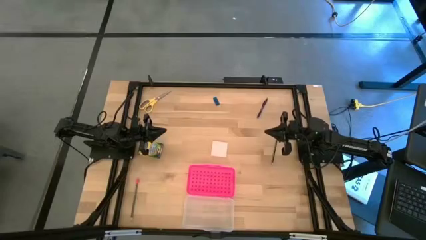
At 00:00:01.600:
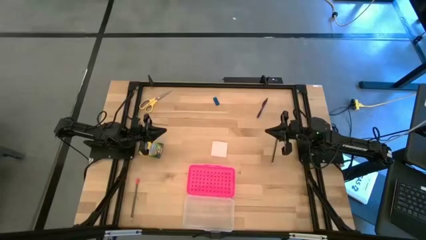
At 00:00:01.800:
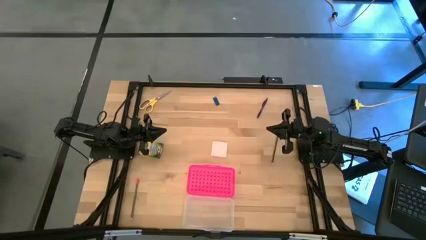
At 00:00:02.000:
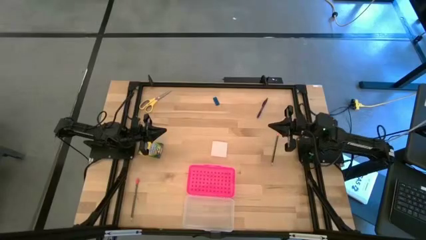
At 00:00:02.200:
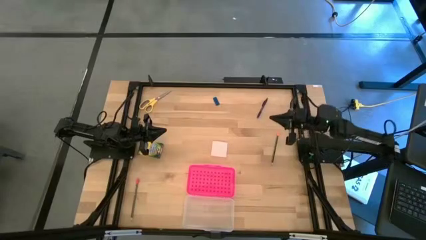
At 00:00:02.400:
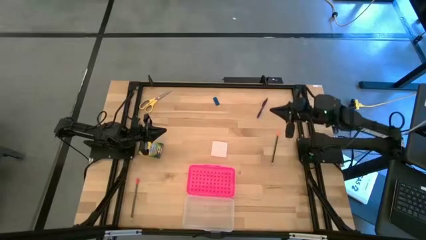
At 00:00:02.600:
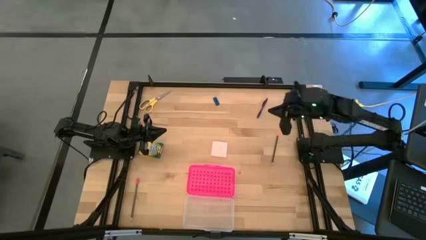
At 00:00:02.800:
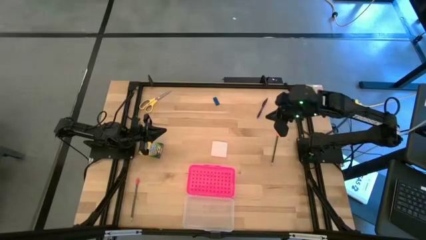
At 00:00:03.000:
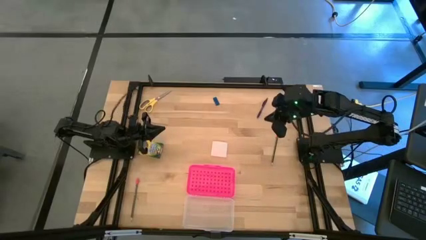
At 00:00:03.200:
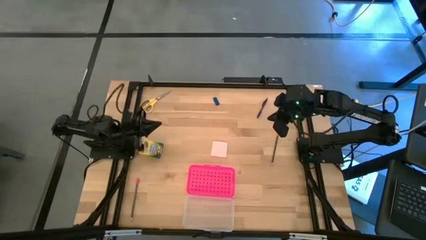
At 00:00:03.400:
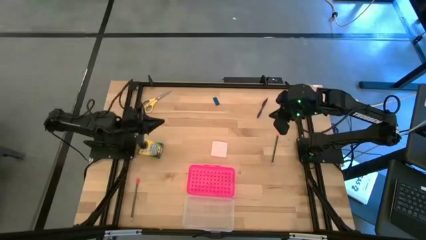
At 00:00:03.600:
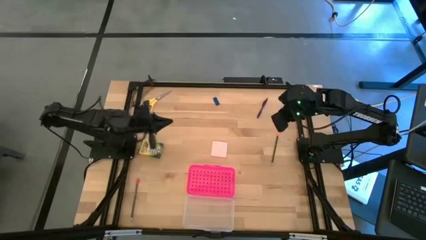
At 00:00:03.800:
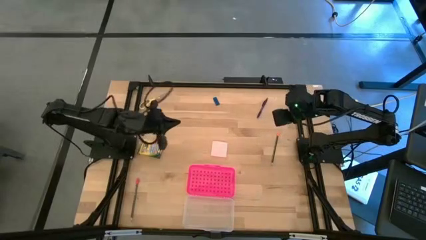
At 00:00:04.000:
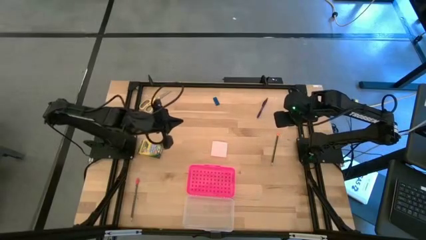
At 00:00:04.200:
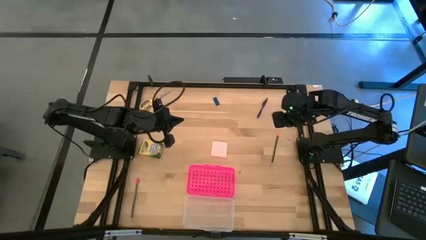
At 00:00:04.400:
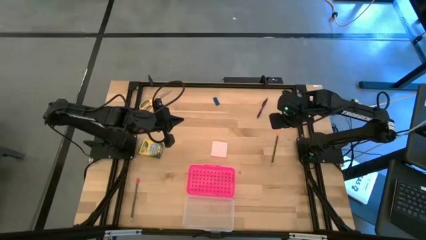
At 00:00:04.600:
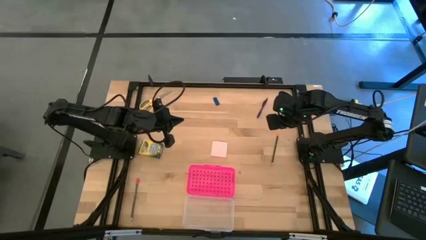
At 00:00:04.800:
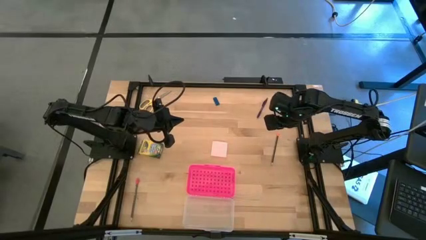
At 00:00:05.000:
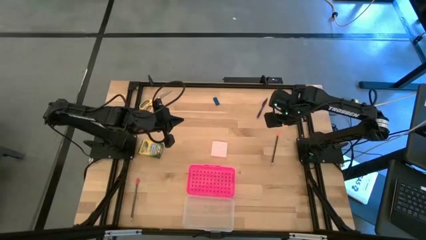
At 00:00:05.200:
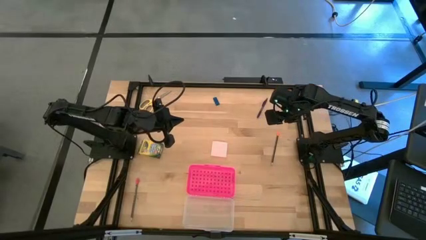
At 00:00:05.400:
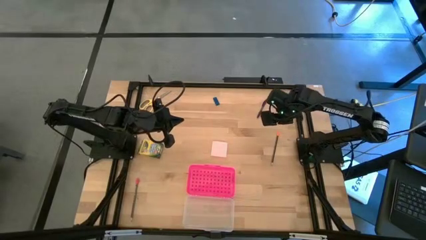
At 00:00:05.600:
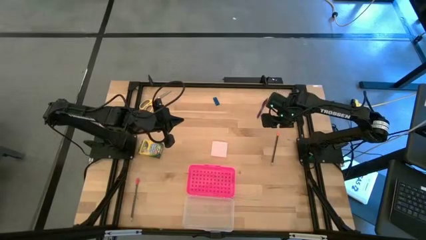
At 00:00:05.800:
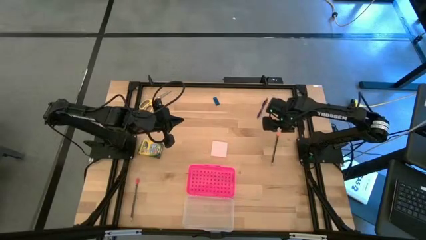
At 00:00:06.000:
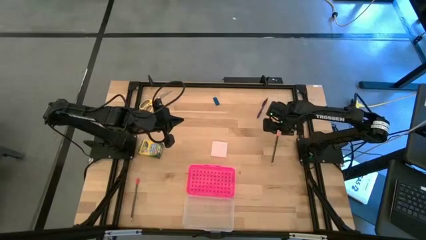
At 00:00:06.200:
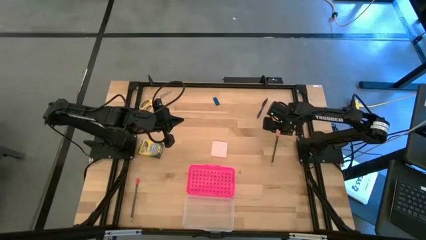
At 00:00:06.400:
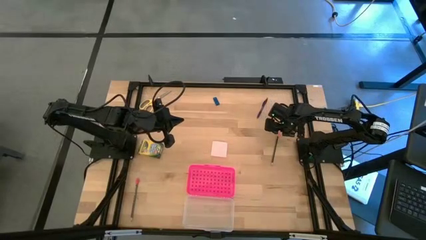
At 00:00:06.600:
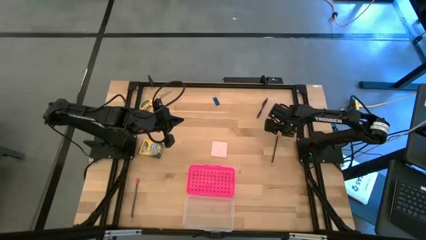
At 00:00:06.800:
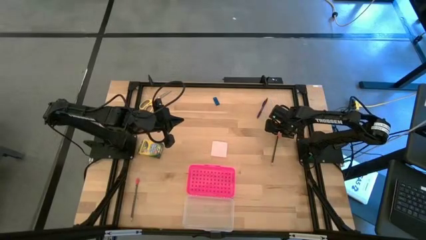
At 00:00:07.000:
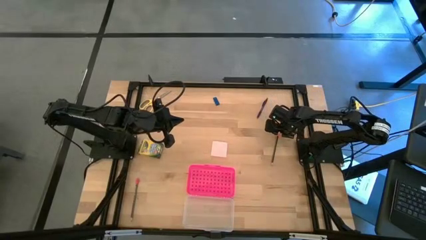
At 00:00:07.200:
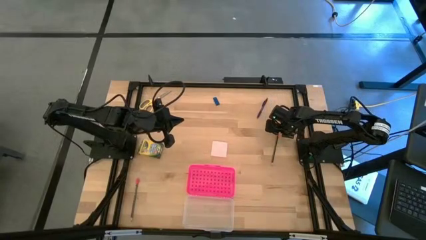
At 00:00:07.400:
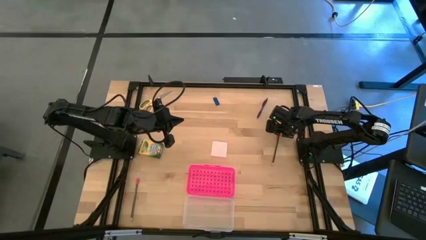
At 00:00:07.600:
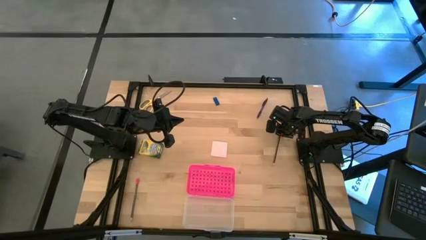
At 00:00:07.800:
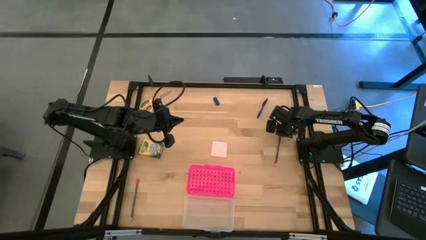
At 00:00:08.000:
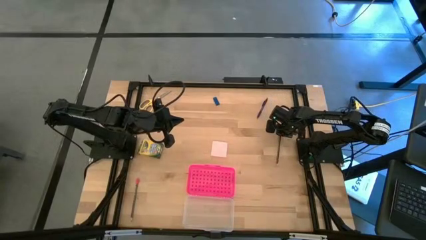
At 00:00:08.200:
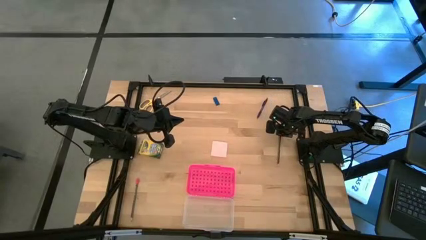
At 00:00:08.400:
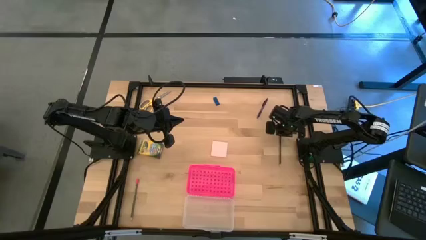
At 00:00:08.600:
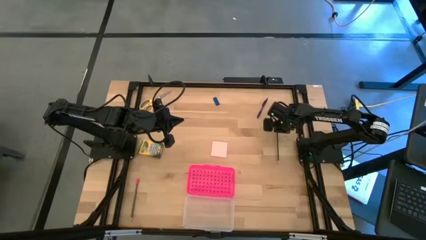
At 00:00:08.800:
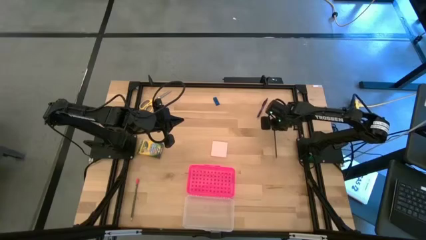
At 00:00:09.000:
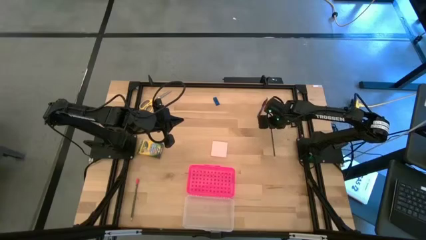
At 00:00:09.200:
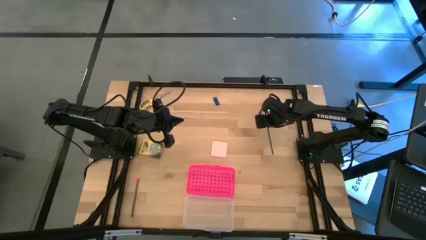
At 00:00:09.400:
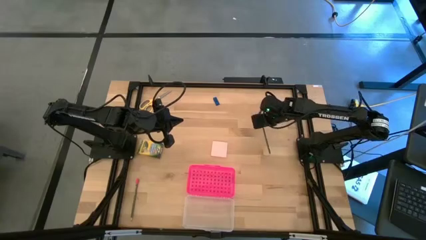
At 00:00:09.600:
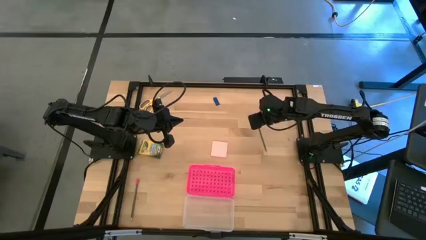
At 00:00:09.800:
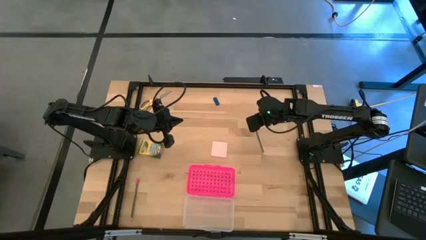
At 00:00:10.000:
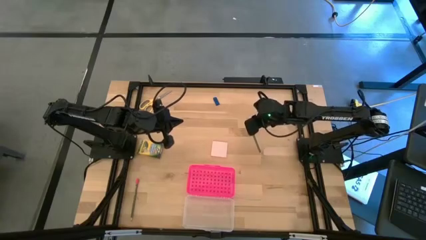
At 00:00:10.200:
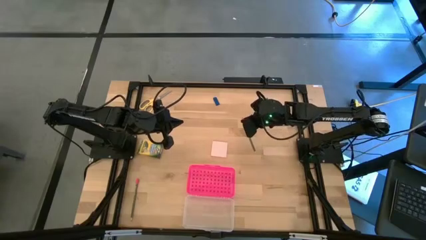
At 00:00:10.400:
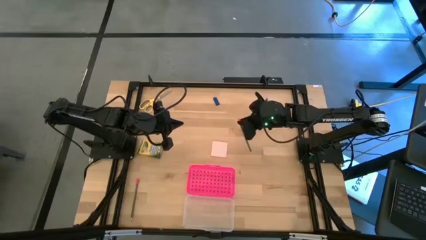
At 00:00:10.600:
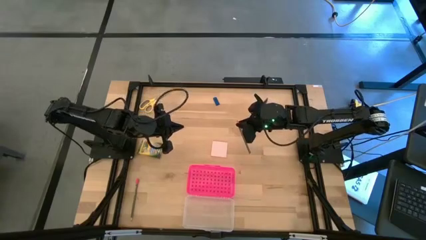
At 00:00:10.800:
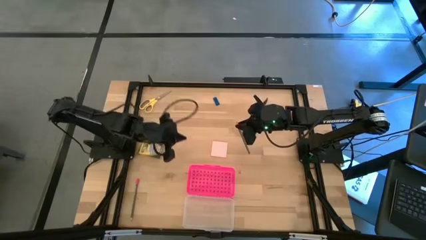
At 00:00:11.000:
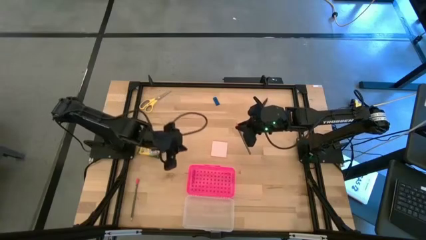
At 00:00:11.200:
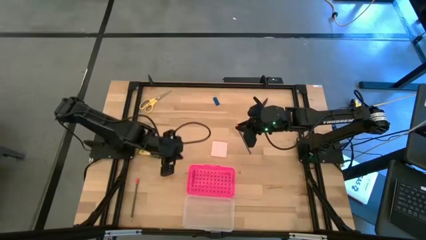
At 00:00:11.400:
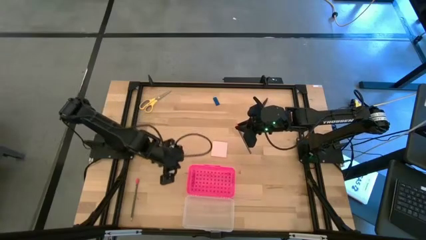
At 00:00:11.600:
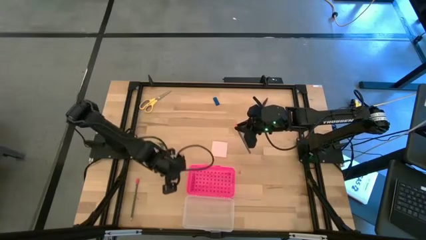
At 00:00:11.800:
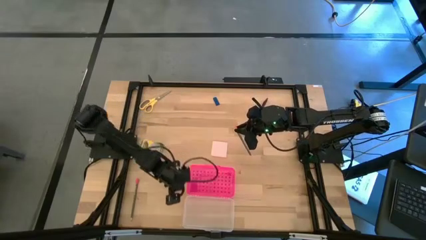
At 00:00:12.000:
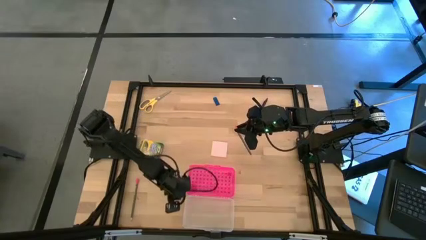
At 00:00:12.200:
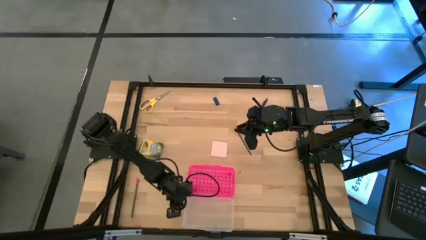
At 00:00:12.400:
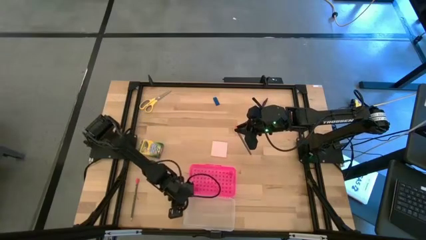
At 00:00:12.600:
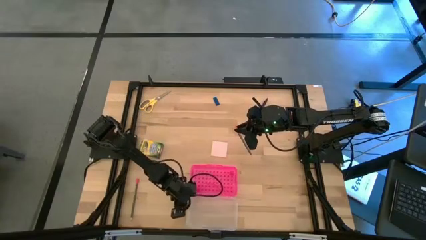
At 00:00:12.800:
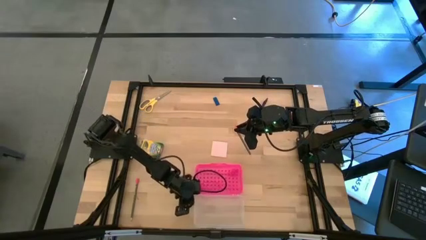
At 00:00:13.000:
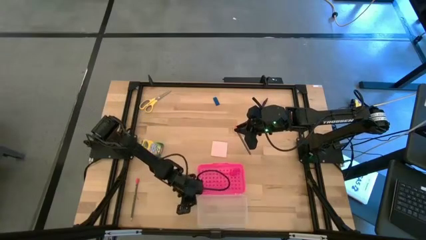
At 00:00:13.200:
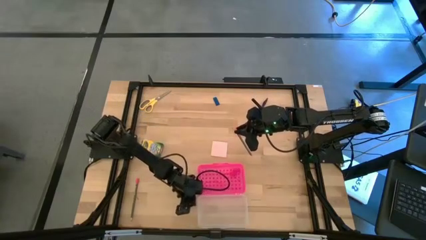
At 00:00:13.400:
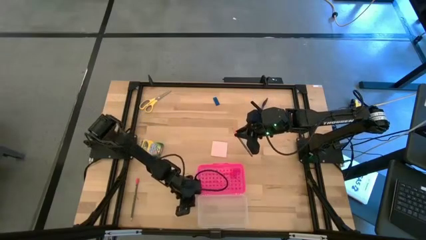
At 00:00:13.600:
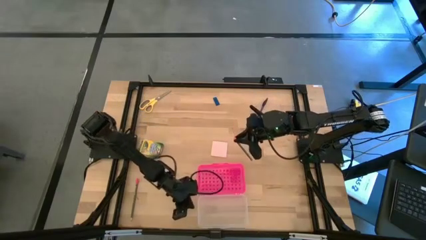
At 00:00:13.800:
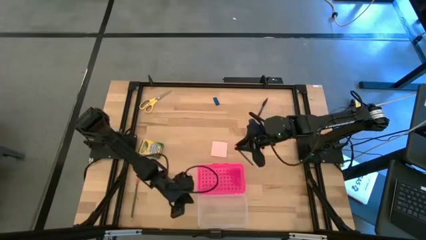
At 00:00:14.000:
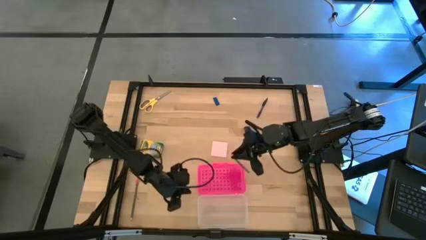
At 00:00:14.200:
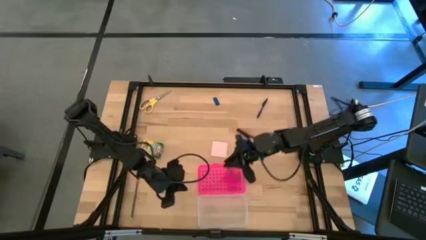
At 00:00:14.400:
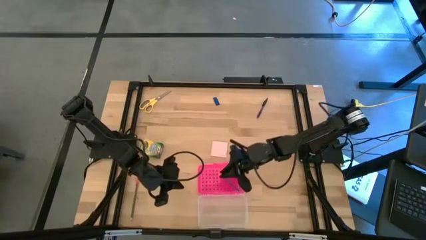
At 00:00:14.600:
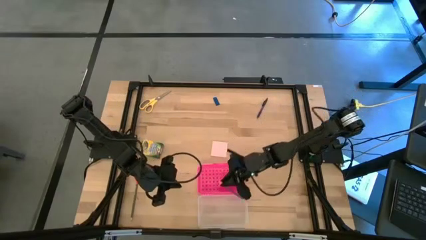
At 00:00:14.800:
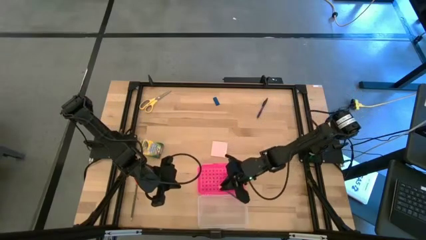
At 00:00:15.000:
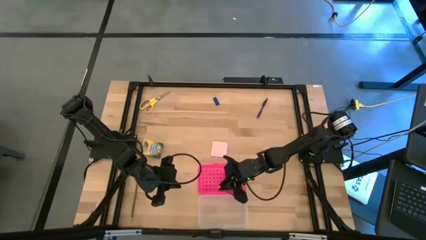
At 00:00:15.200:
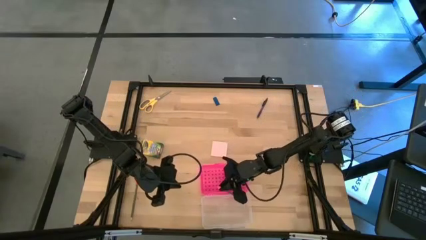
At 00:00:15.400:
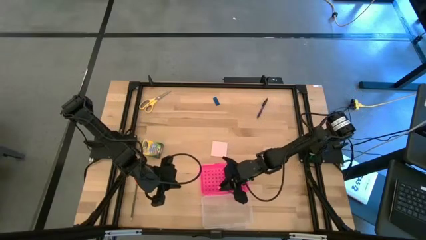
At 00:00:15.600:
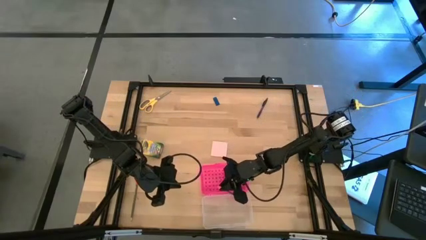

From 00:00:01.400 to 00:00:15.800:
Task: Pack school essentials
Put the orange pencil into the pink supply box
